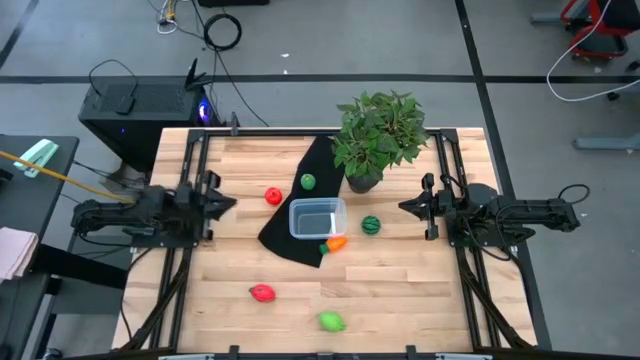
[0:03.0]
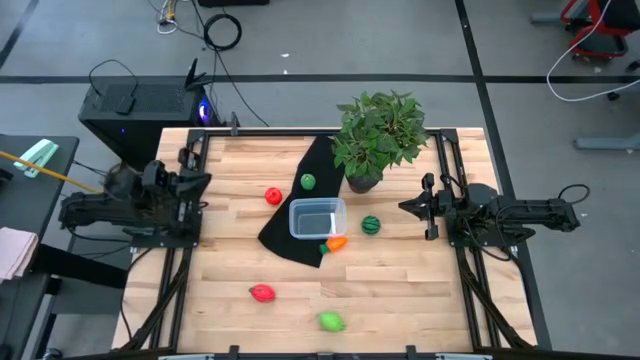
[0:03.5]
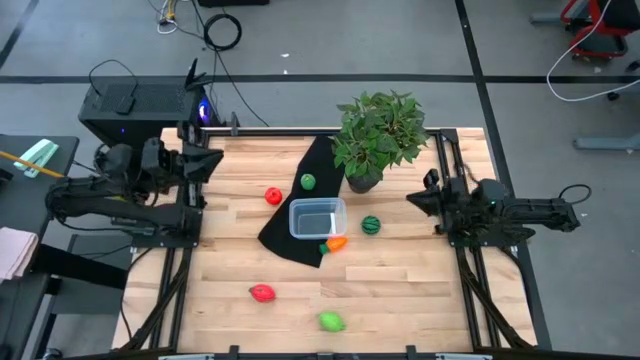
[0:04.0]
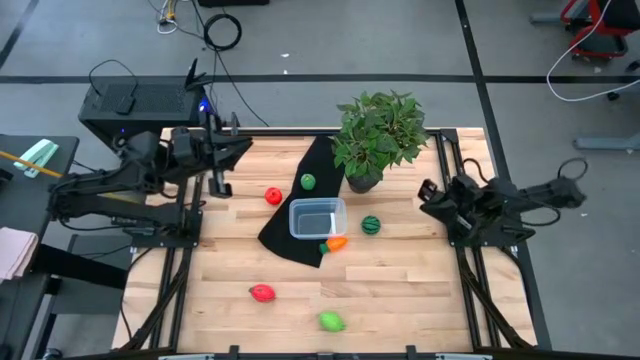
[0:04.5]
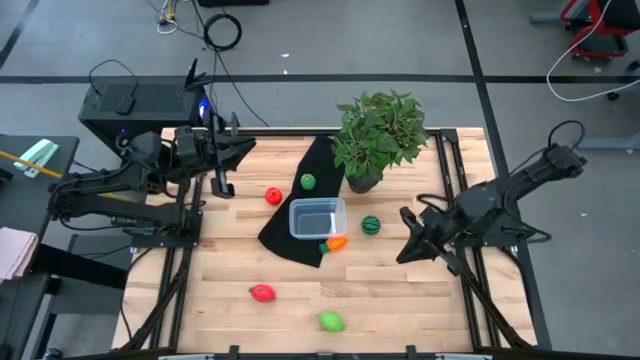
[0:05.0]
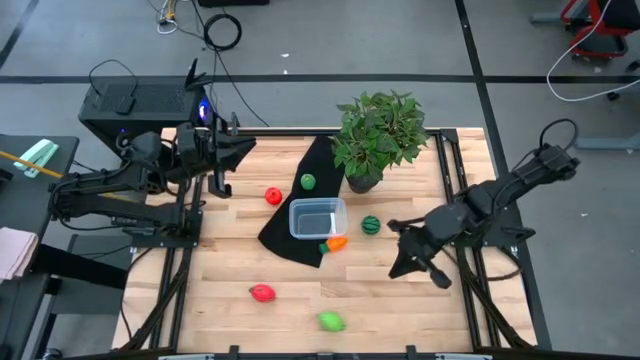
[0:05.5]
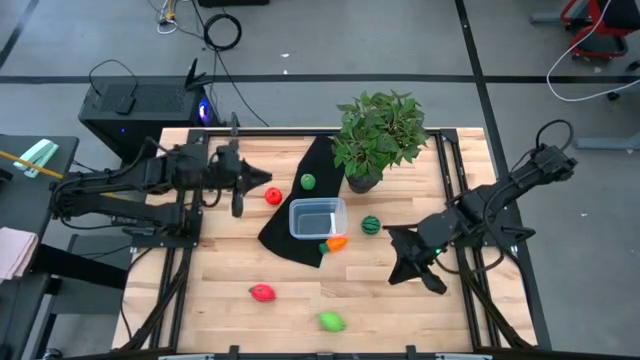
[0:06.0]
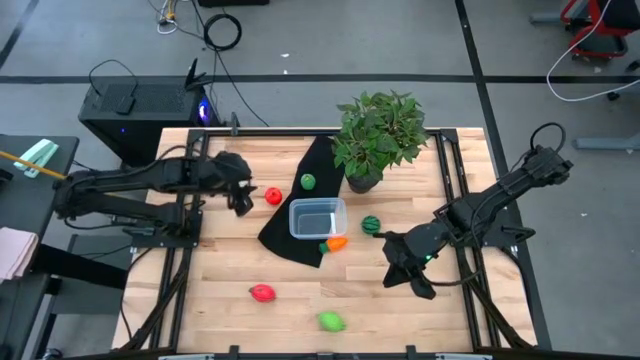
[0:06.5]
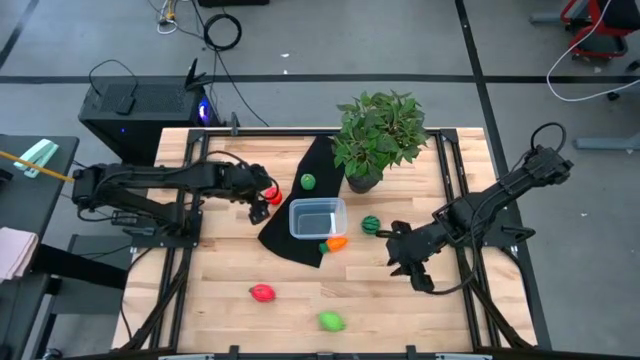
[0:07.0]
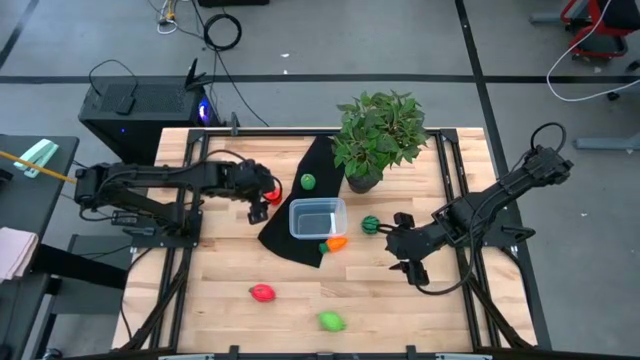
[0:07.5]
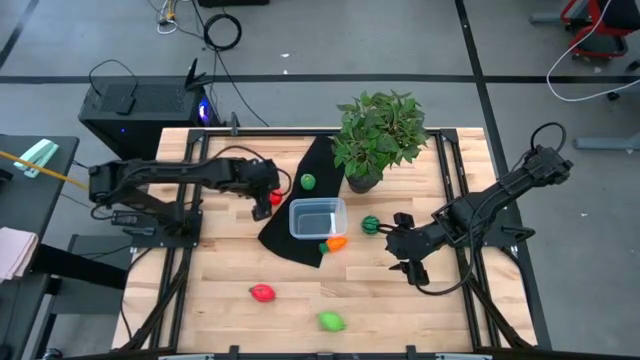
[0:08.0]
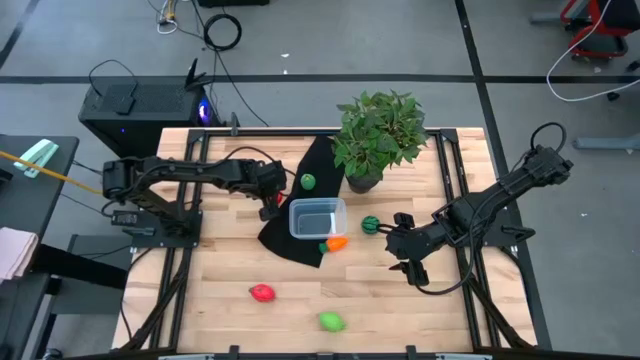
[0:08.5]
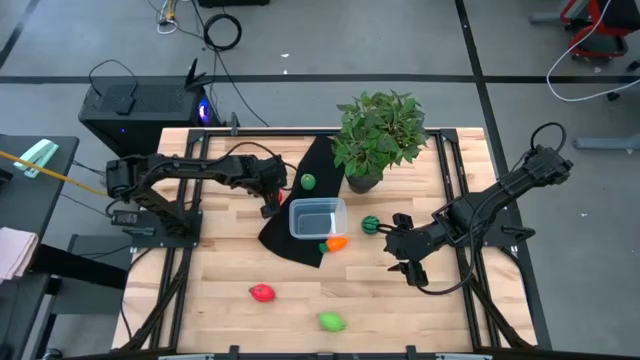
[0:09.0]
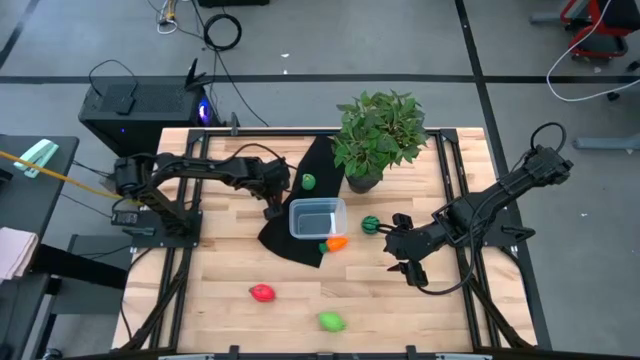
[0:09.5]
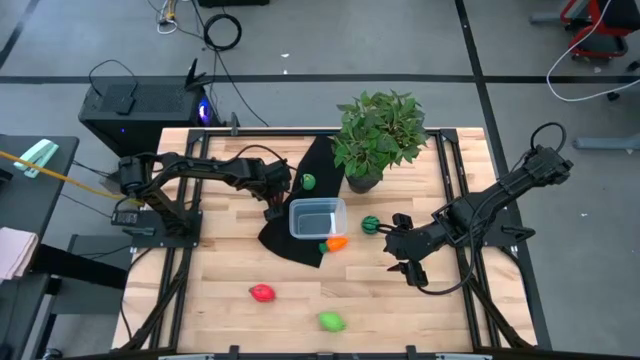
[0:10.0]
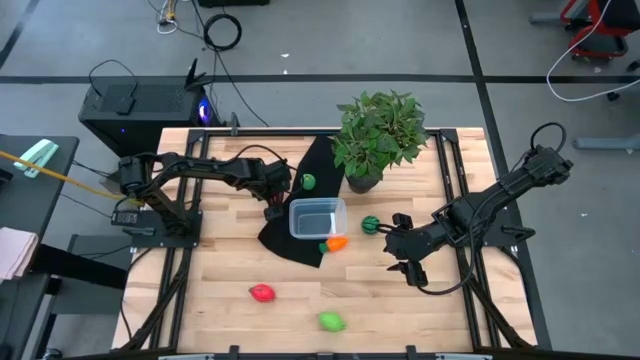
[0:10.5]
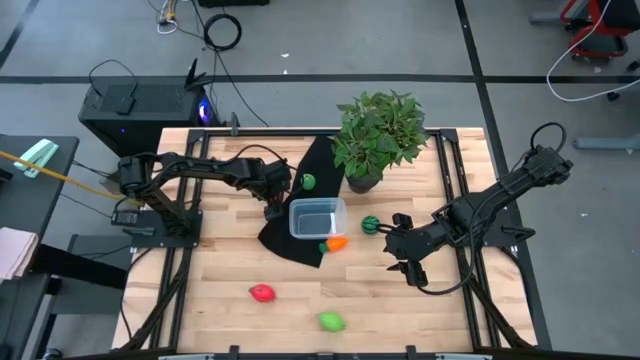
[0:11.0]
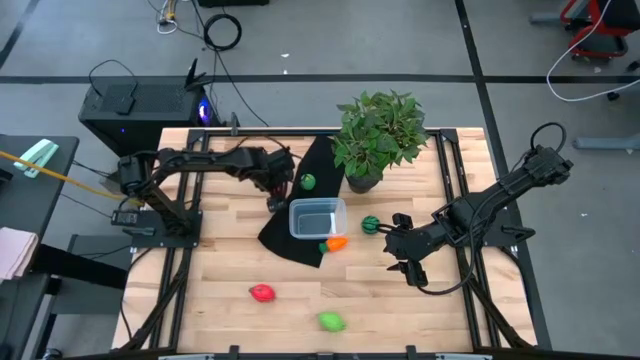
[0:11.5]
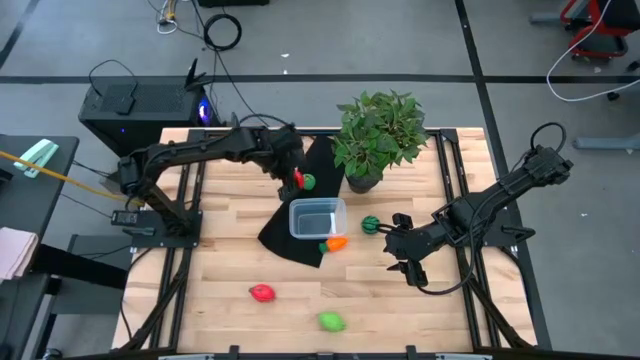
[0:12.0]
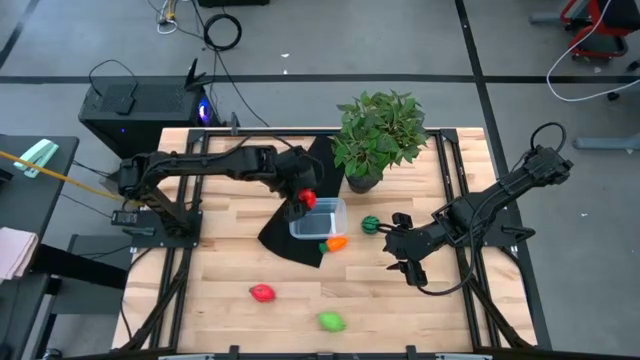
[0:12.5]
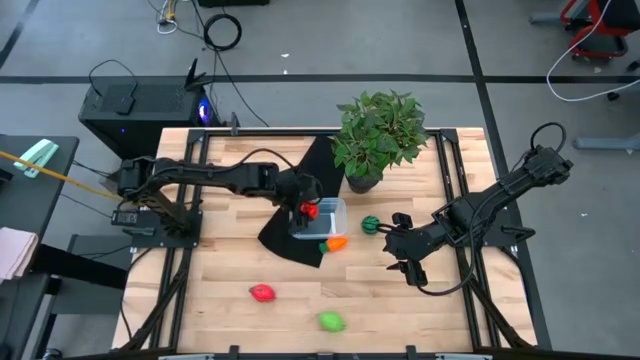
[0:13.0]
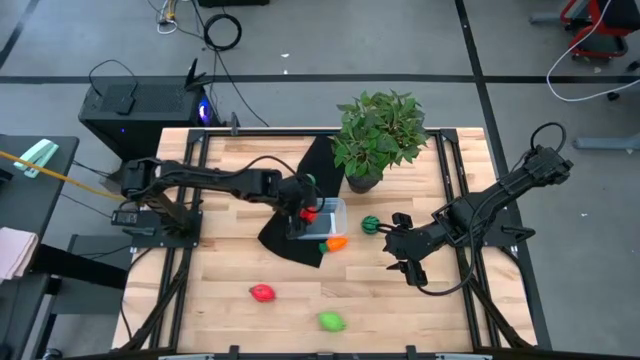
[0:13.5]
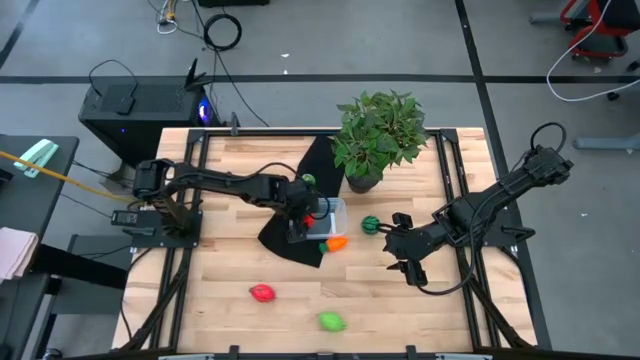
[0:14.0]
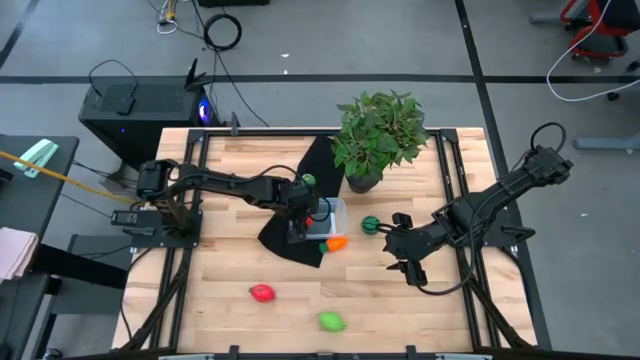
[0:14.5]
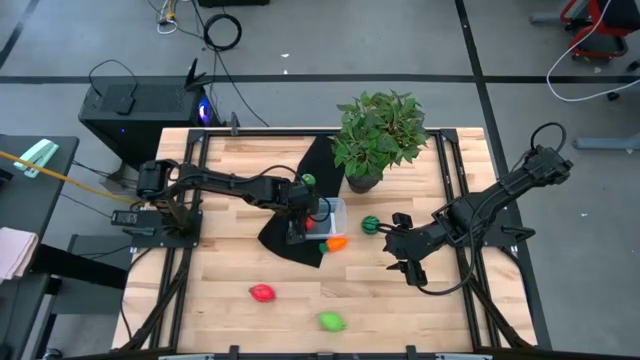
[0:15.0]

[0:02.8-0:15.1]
Task: Pick and placing Produce into tupperware
Put the red apple into the bin

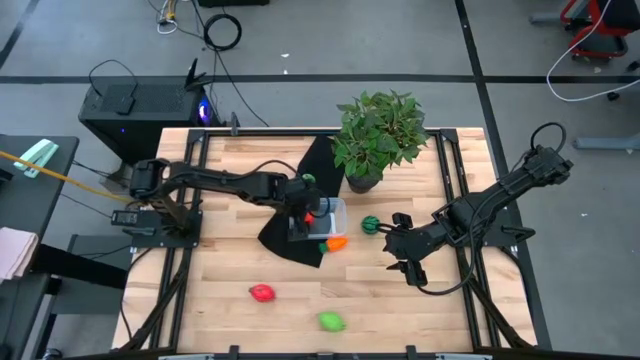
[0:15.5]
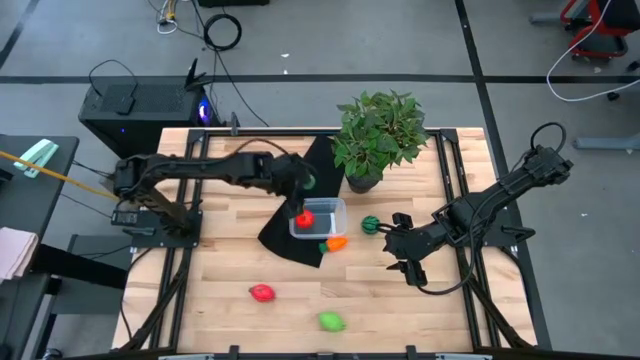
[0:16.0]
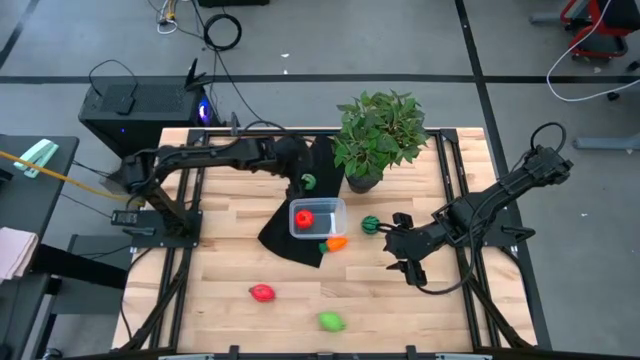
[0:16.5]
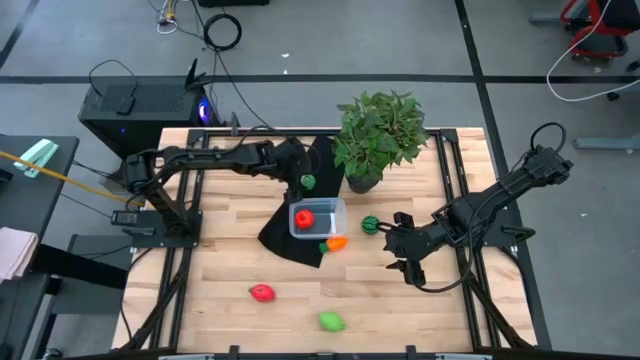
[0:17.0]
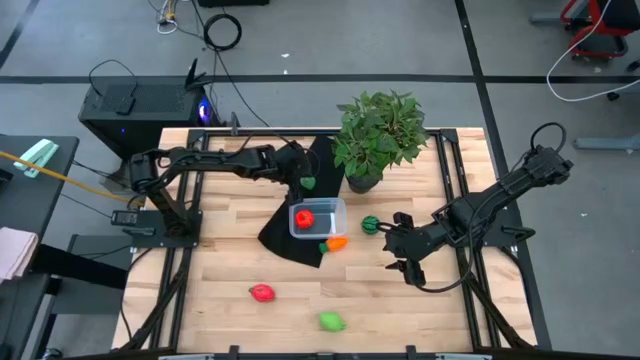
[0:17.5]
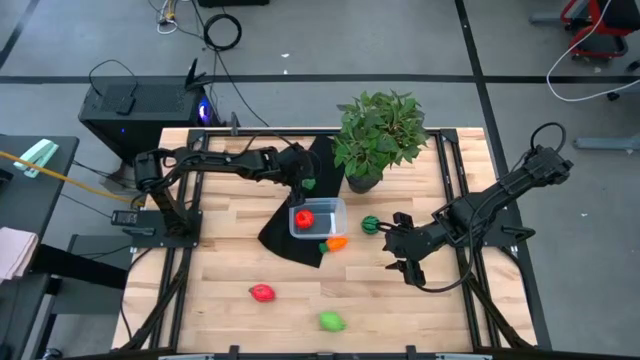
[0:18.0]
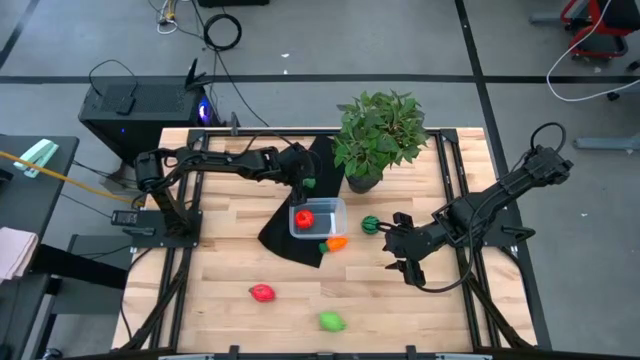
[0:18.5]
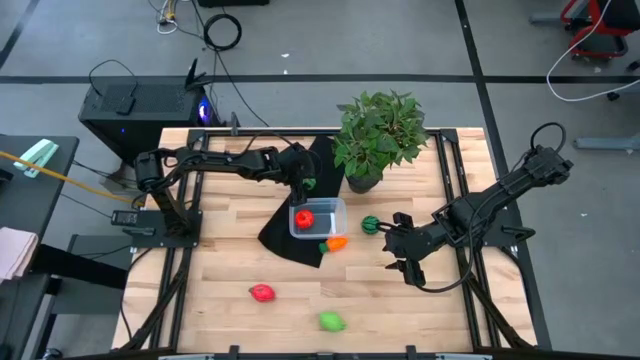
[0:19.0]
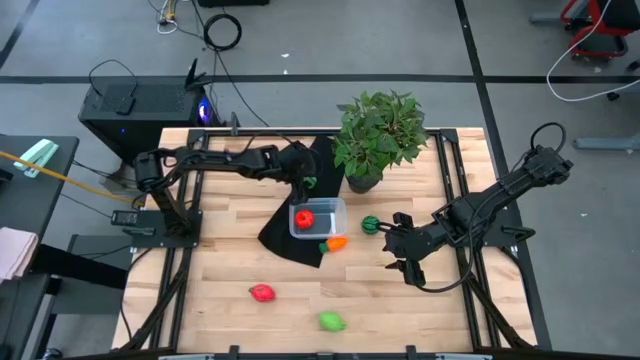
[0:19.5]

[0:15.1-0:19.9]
Put the green corn into the bin

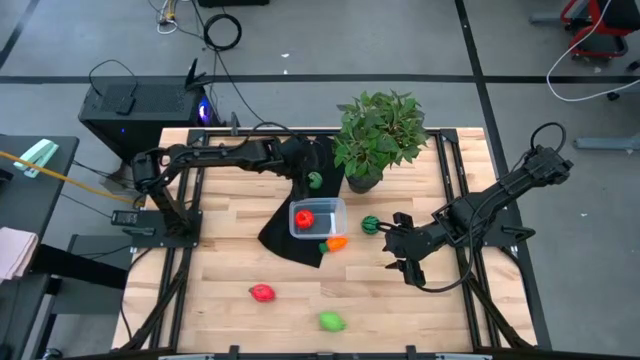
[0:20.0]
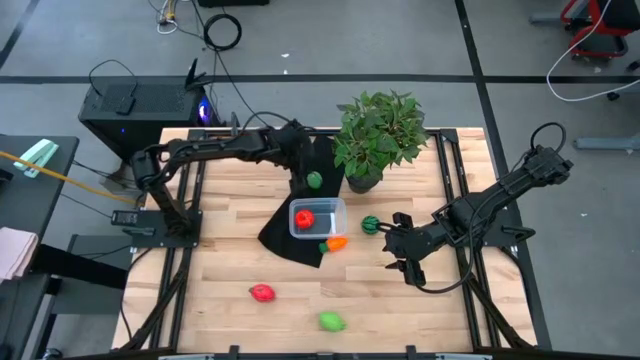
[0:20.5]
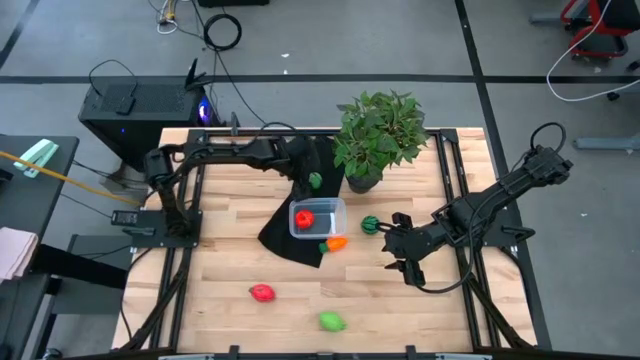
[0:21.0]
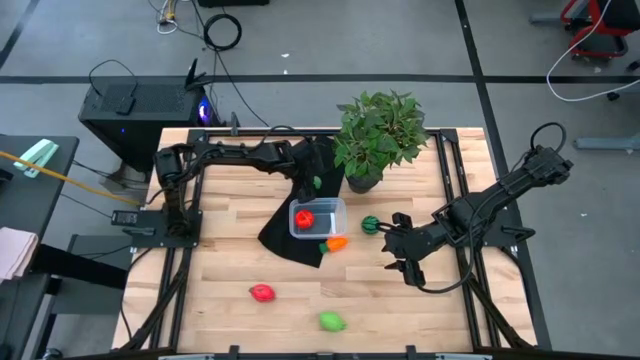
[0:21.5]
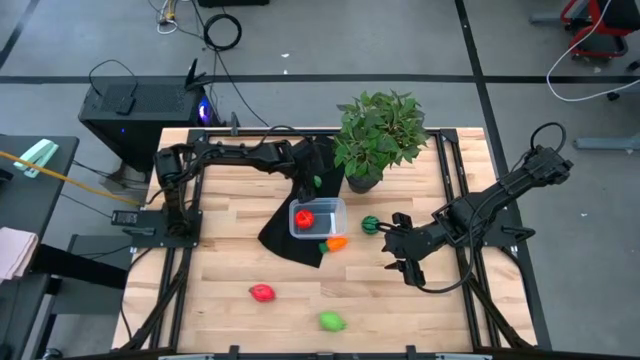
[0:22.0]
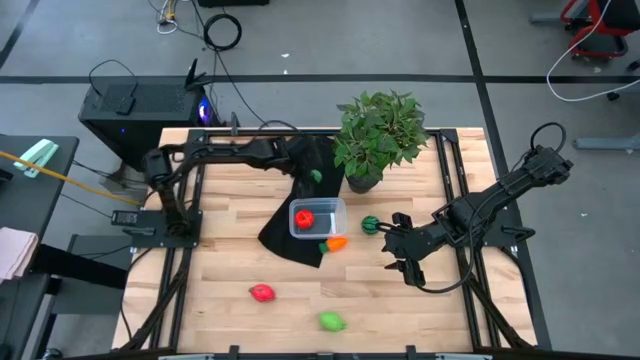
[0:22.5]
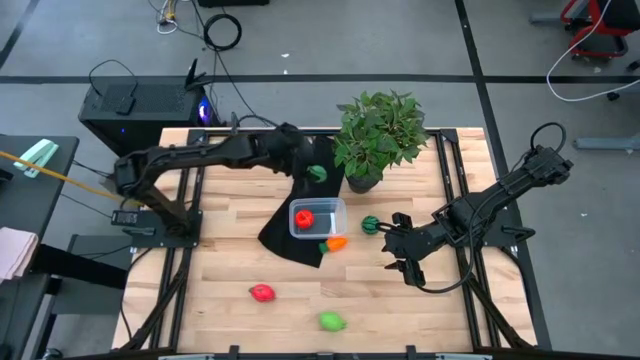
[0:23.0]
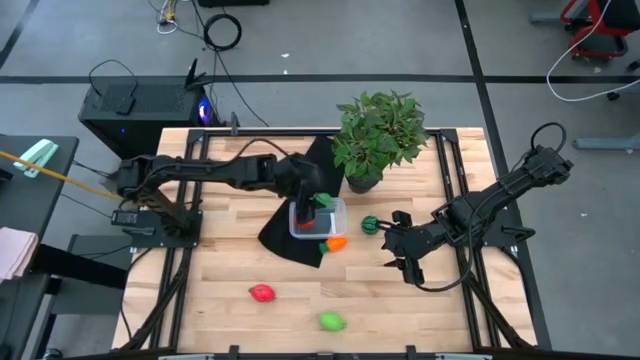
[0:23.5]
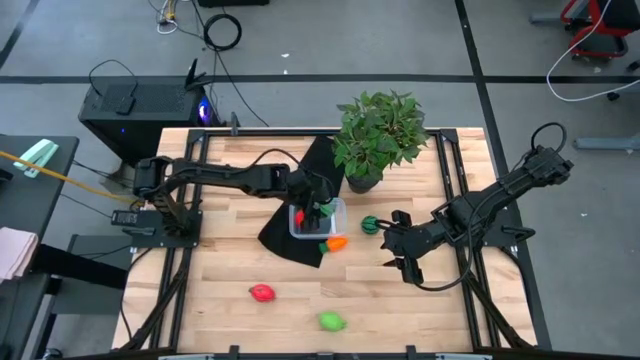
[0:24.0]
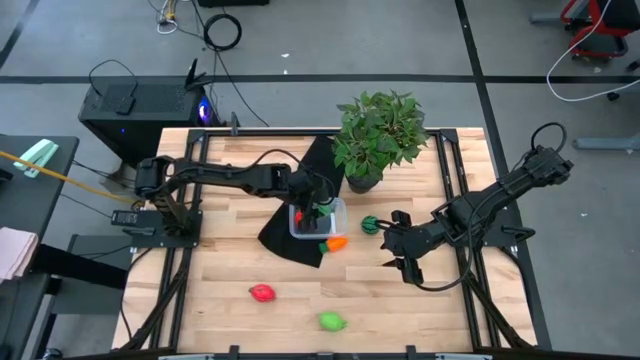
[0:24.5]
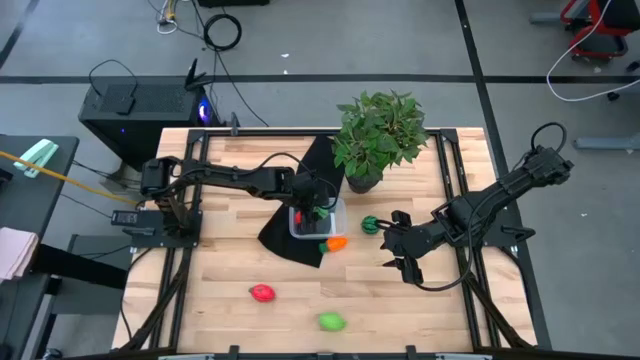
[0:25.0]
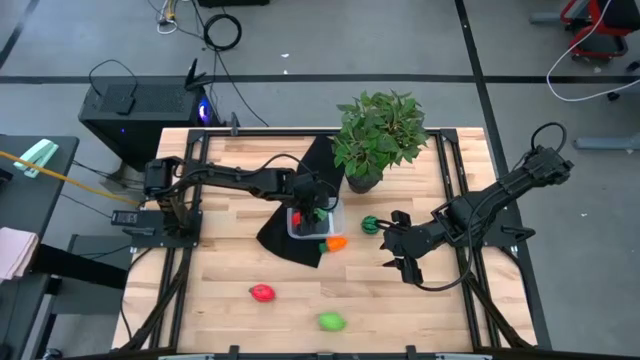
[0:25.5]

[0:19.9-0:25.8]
Put the green corn into the bin
